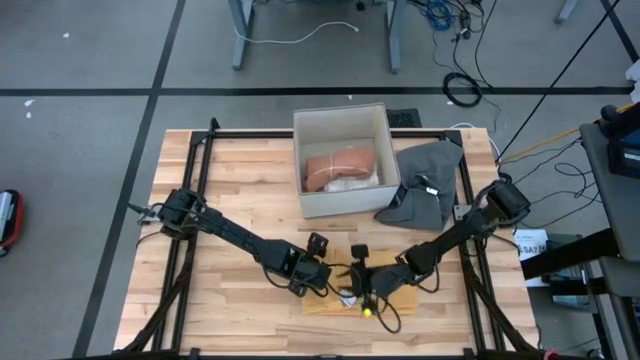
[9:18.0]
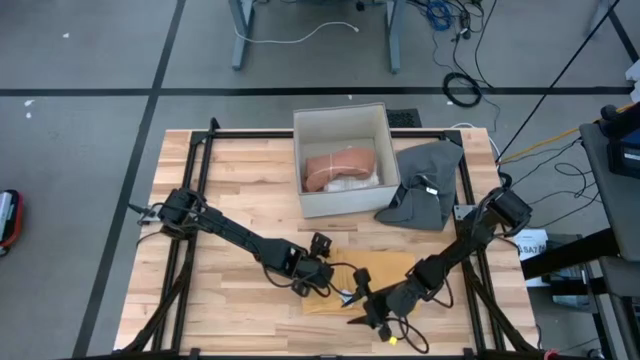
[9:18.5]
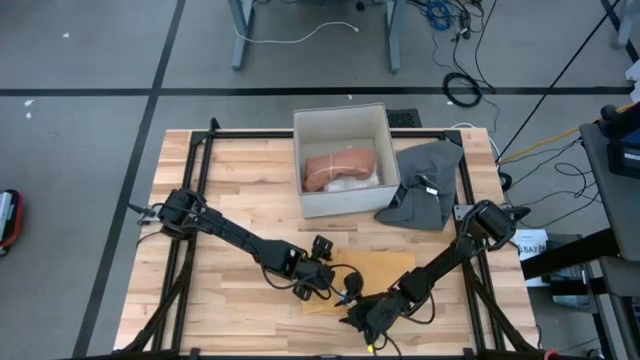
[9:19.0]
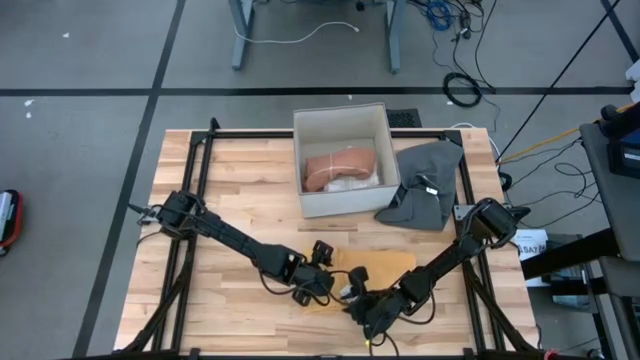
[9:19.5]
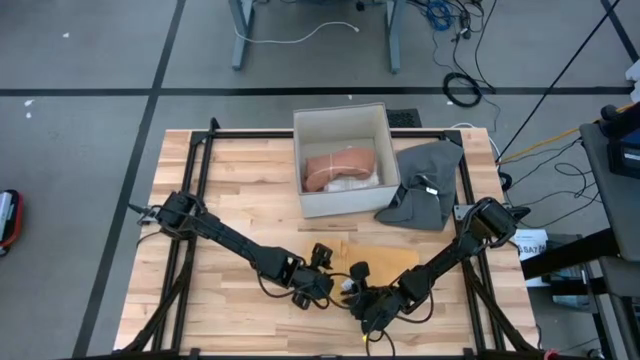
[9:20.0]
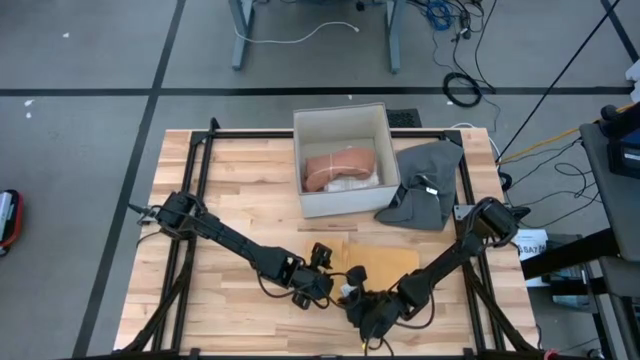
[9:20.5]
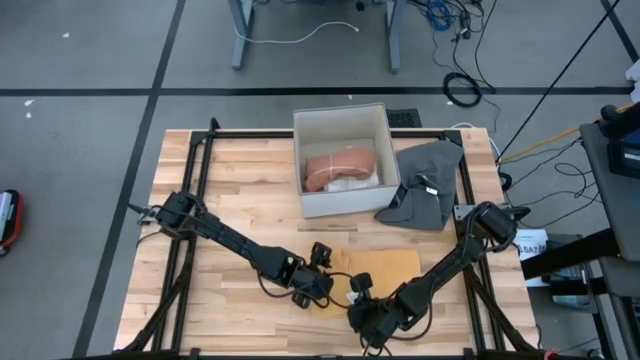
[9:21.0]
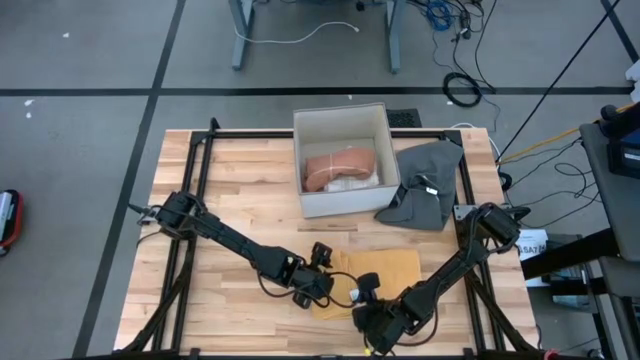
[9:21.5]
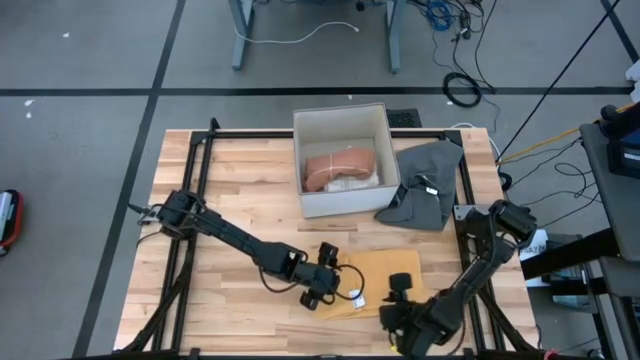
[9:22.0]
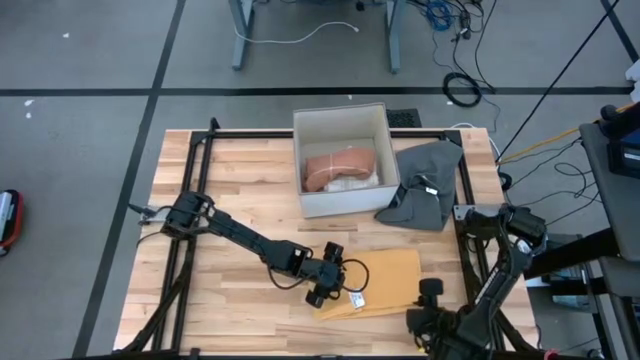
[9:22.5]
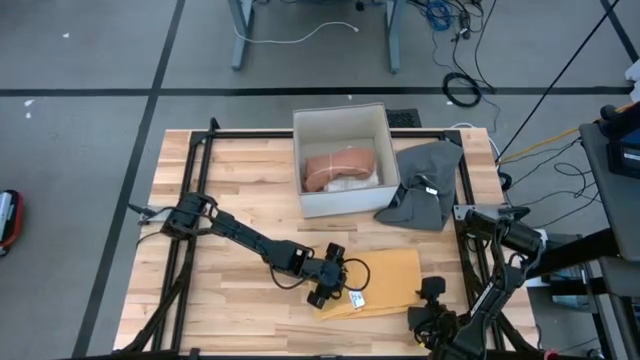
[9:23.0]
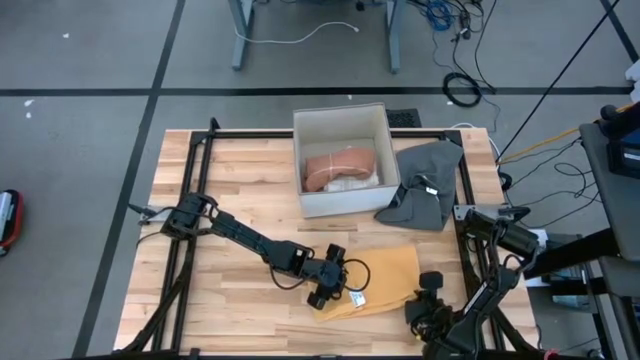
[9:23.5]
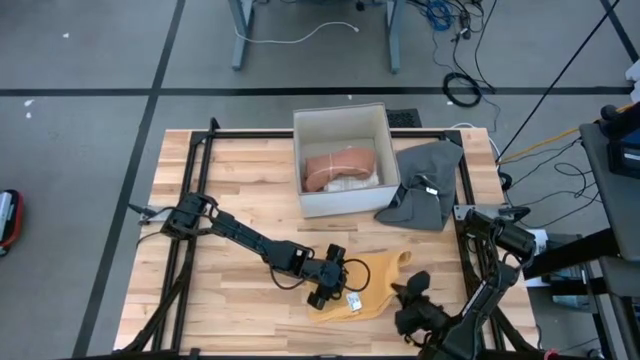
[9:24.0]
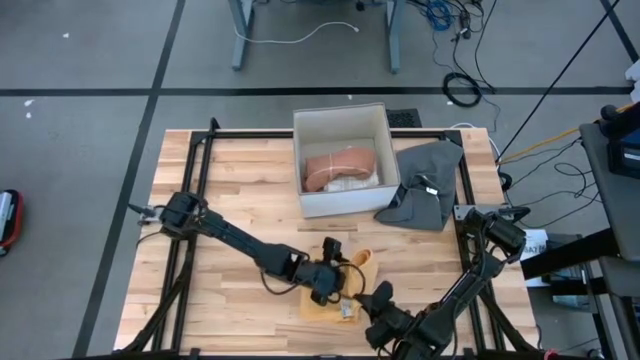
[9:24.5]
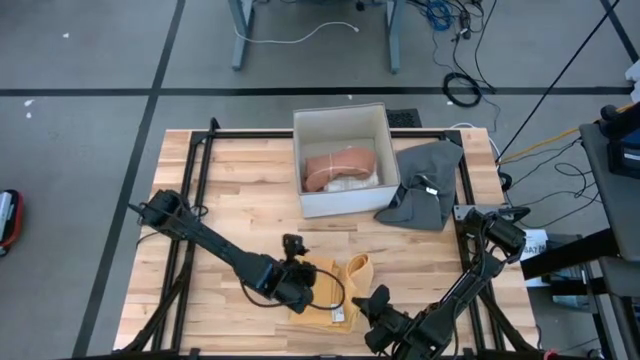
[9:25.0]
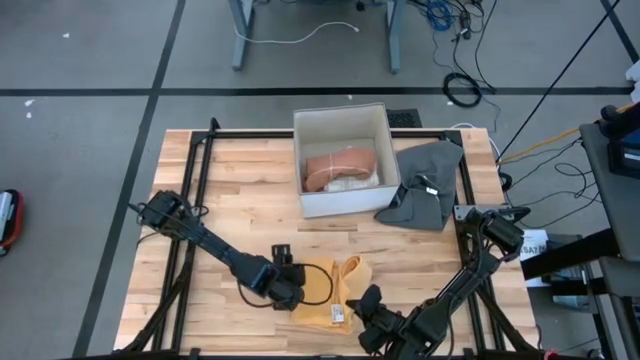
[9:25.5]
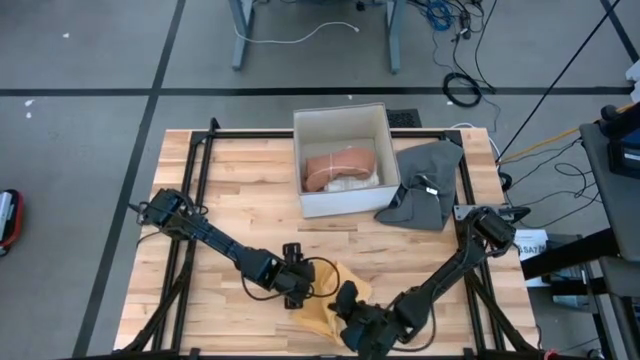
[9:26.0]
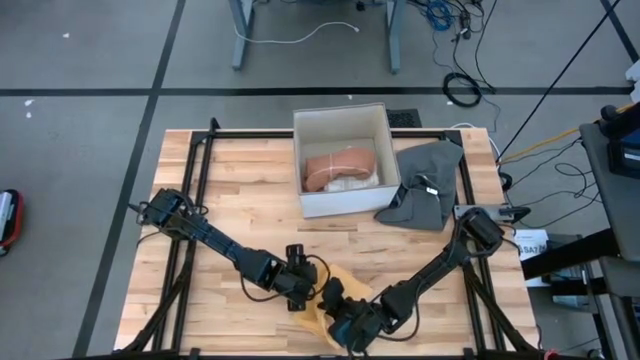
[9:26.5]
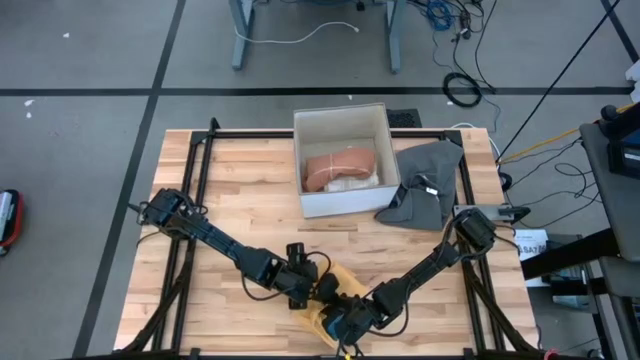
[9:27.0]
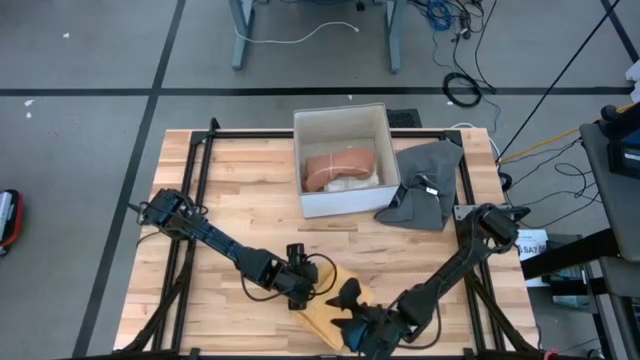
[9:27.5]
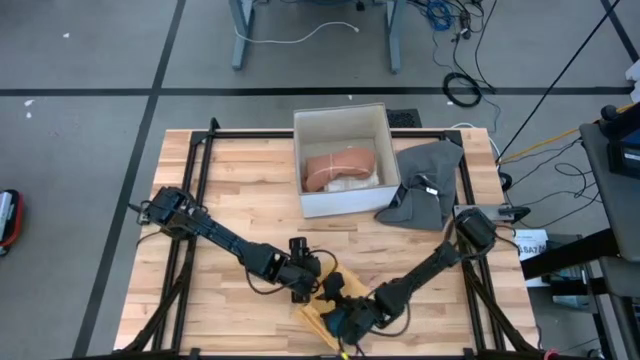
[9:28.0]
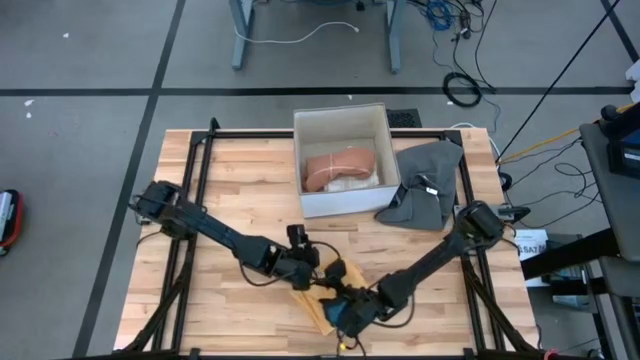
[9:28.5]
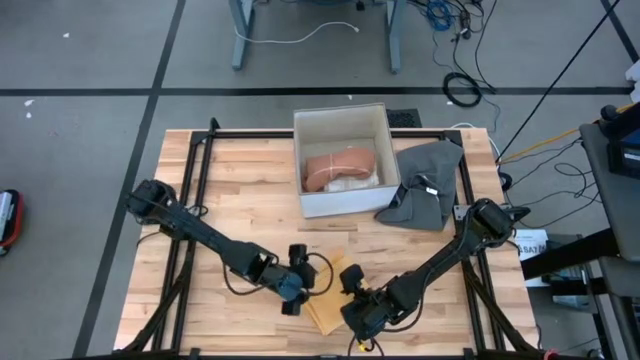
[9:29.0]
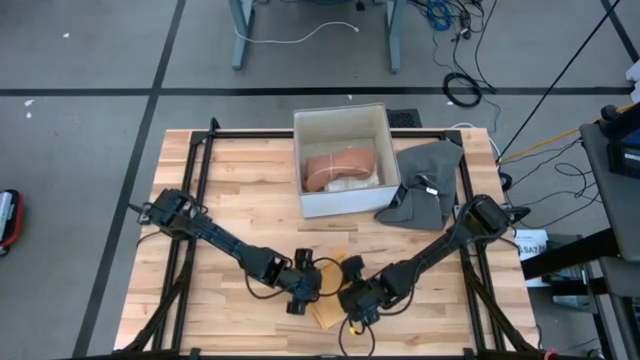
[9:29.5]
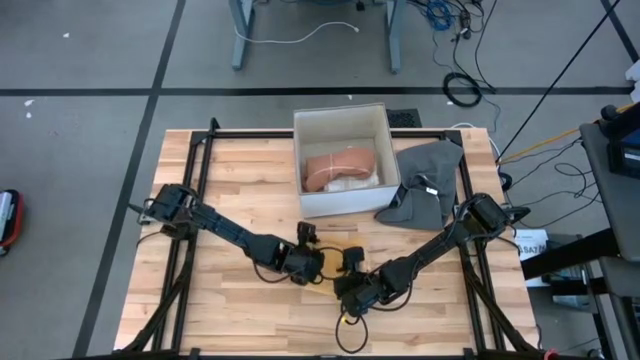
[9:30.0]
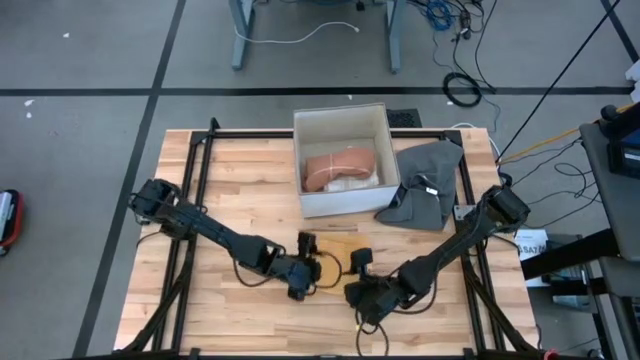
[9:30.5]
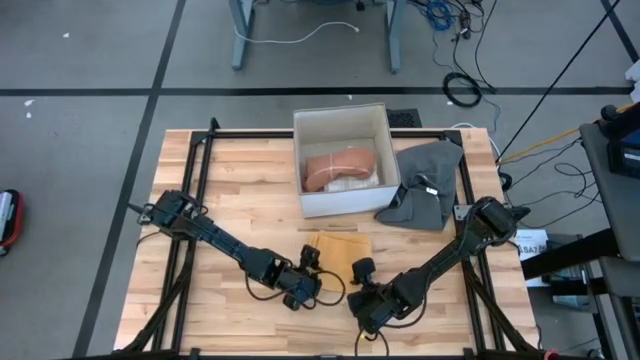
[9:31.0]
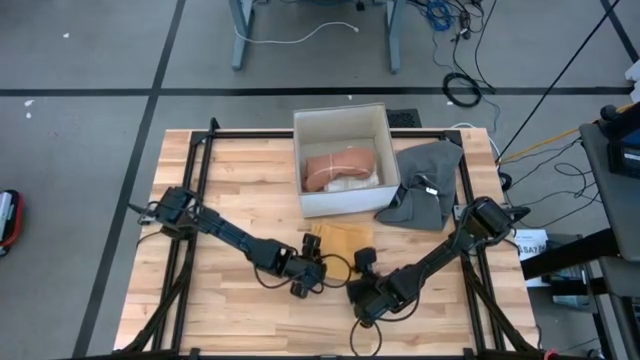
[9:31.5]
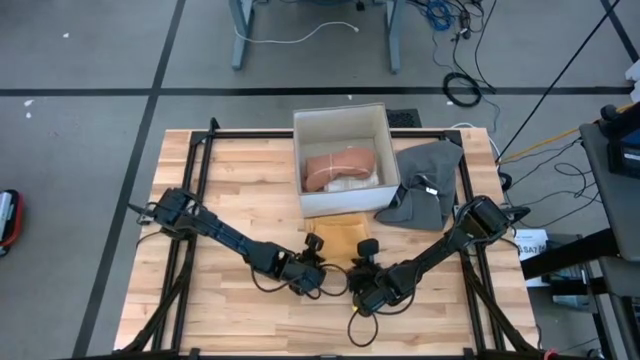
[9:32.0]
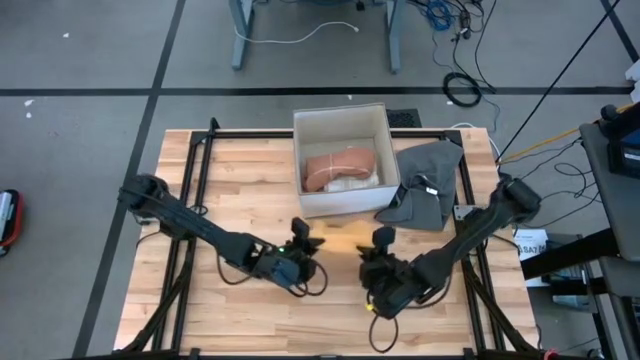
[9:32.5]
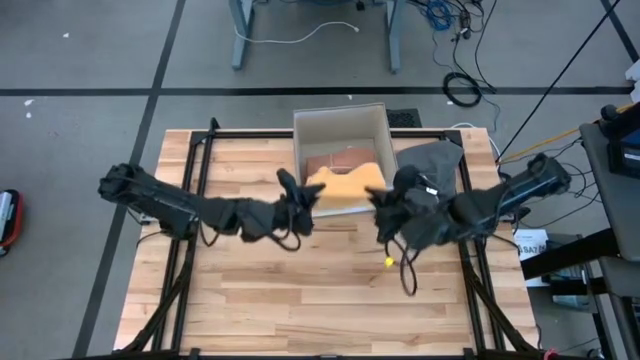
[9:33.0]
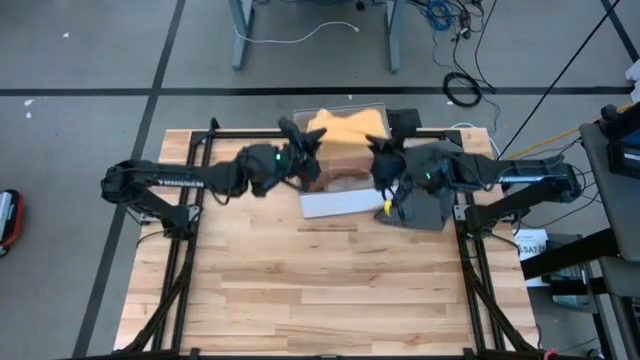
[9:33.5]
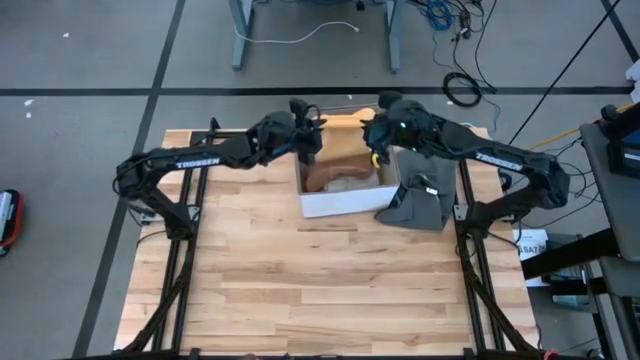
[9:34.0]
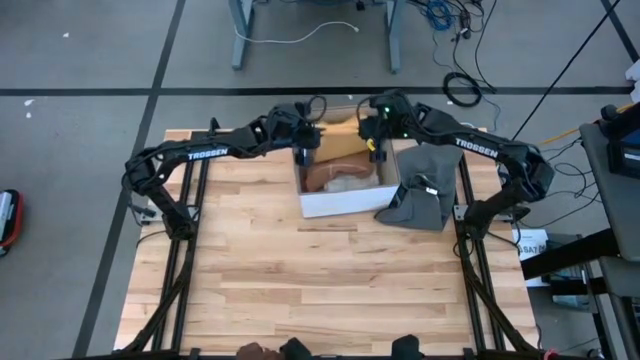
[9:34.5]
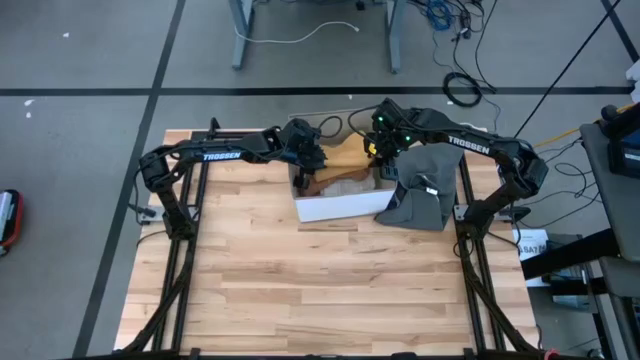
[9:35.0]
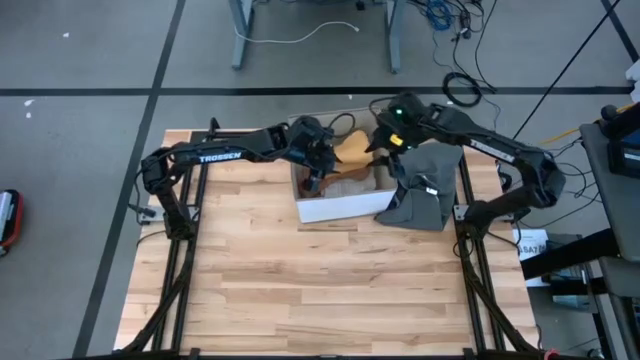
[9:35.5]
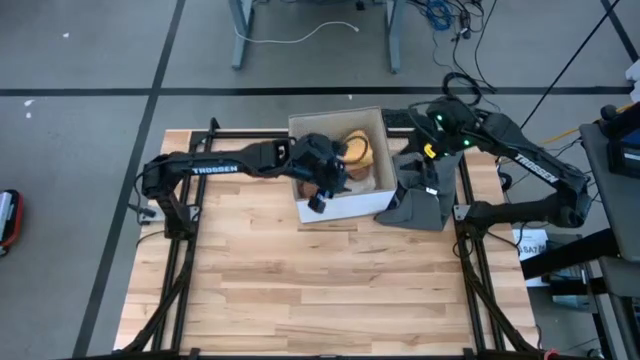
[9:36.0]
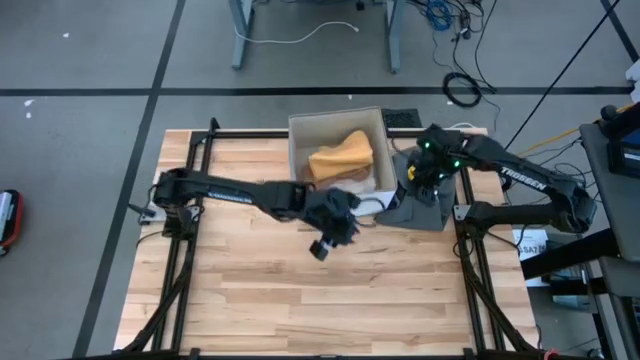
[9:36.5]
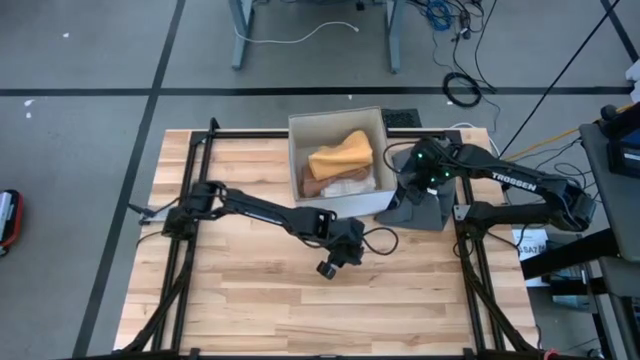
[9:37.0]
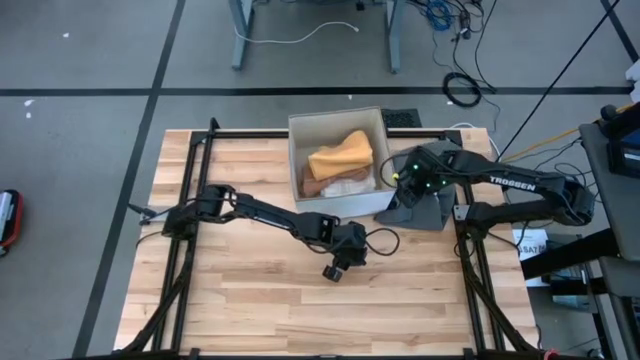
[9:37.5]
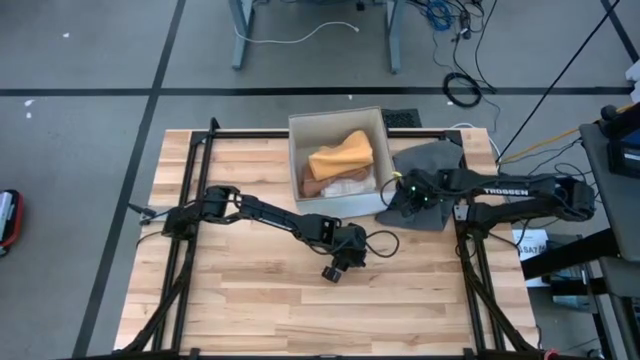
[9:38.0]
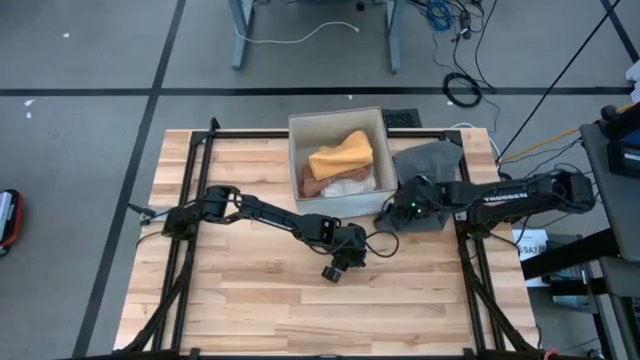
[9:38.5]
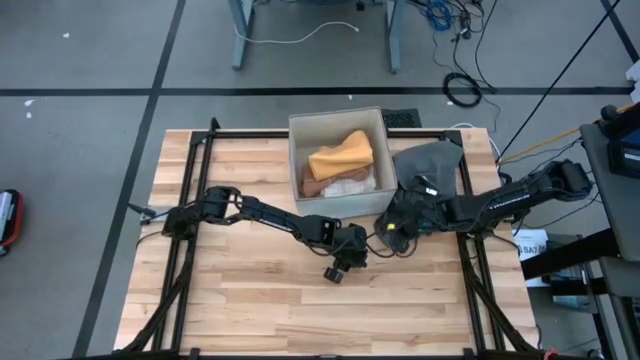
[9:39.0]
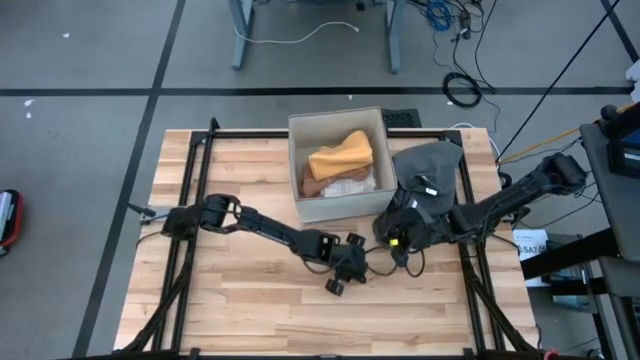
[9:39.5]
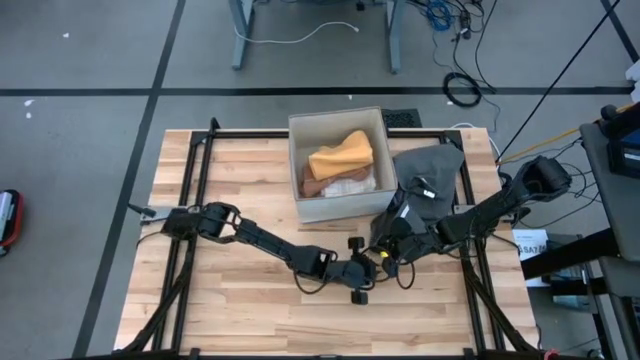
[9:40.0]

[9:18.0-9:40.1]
Task: Fold towel
Fold the orange towel
